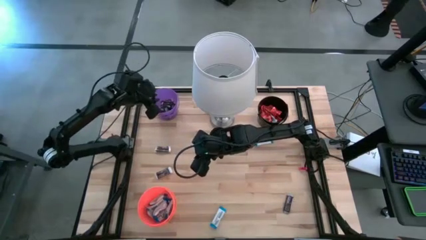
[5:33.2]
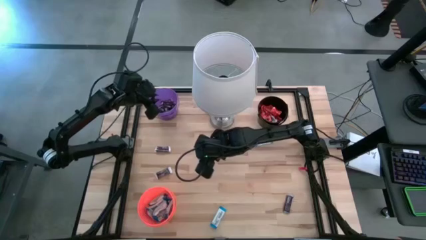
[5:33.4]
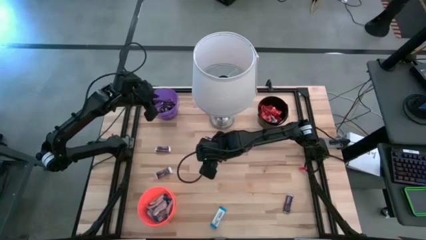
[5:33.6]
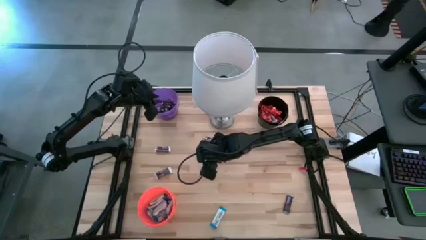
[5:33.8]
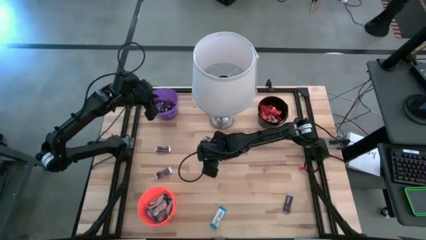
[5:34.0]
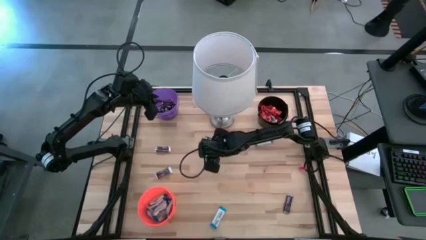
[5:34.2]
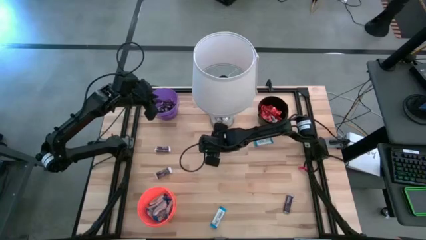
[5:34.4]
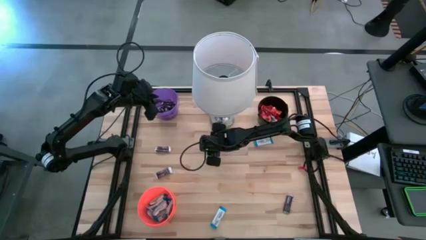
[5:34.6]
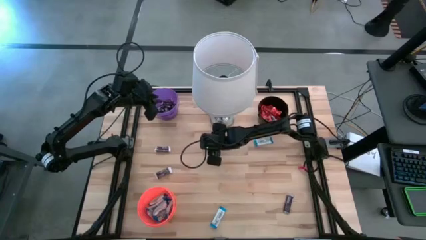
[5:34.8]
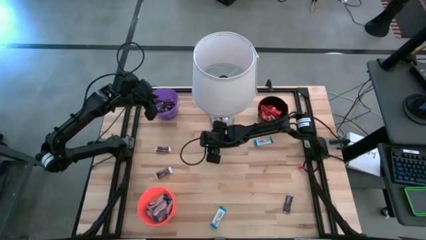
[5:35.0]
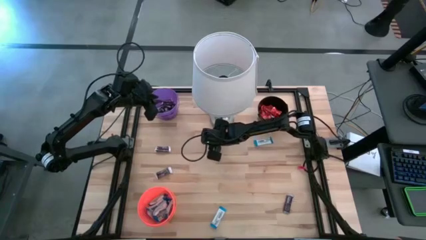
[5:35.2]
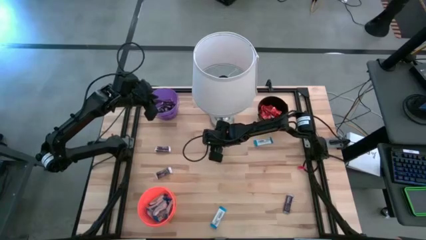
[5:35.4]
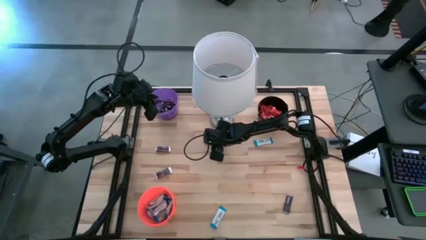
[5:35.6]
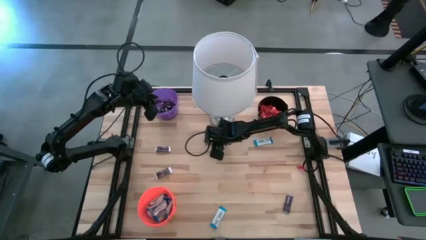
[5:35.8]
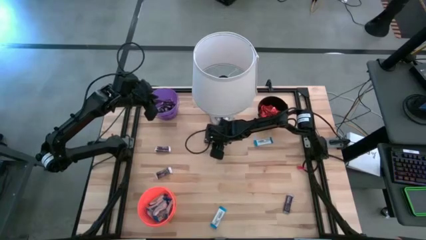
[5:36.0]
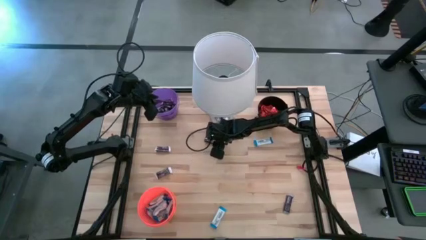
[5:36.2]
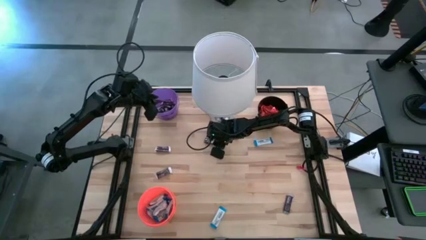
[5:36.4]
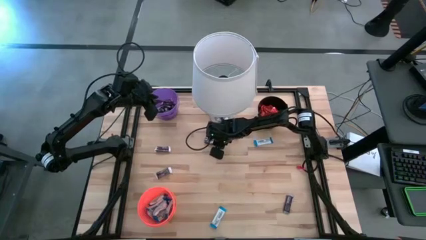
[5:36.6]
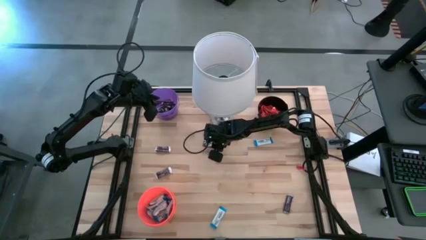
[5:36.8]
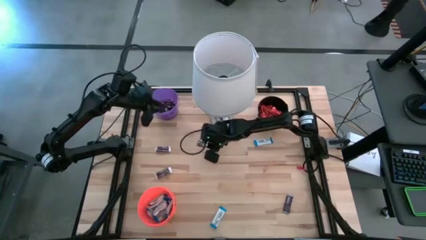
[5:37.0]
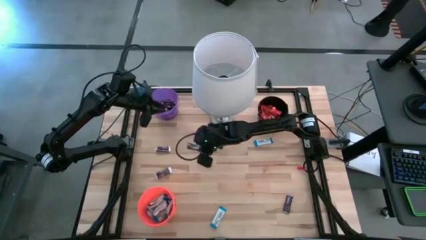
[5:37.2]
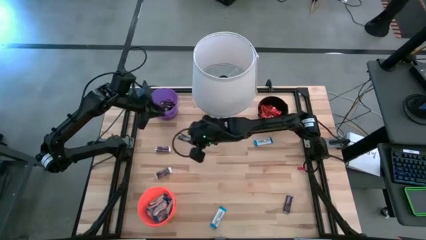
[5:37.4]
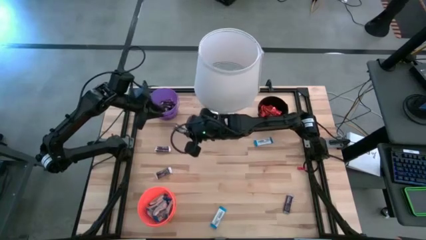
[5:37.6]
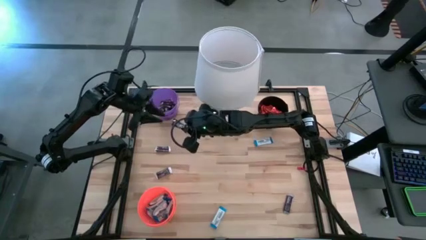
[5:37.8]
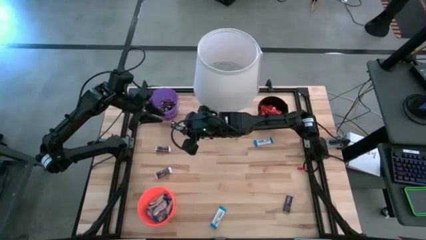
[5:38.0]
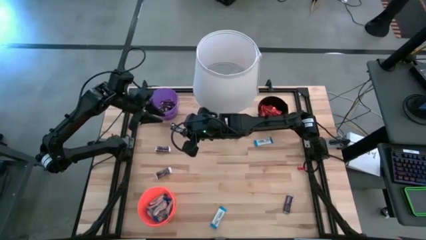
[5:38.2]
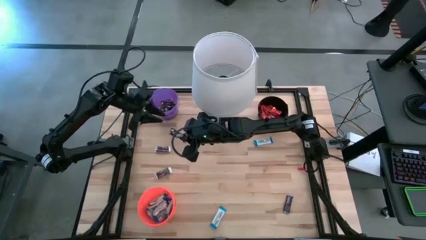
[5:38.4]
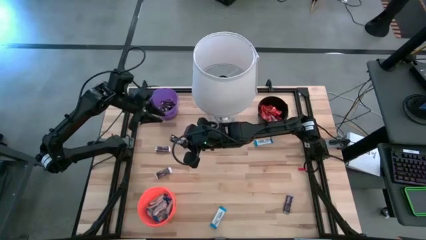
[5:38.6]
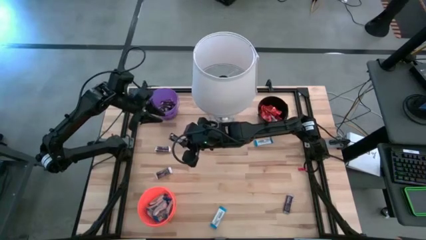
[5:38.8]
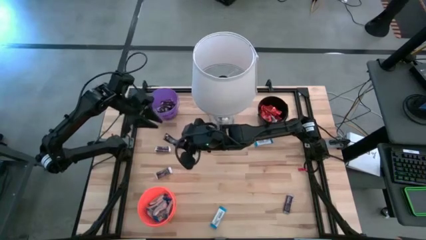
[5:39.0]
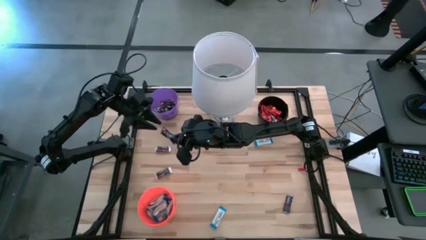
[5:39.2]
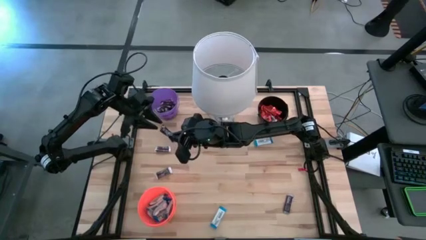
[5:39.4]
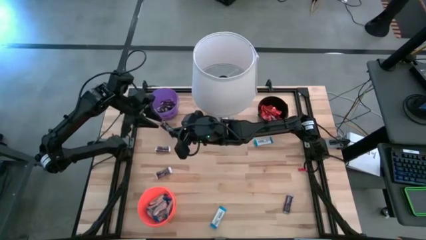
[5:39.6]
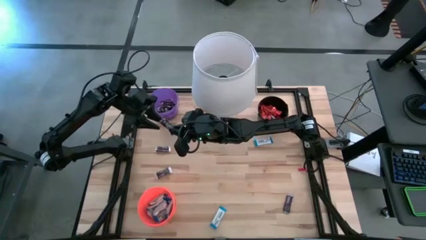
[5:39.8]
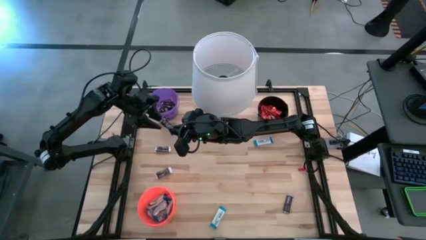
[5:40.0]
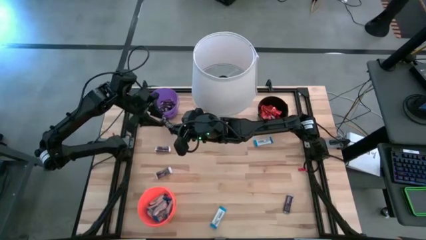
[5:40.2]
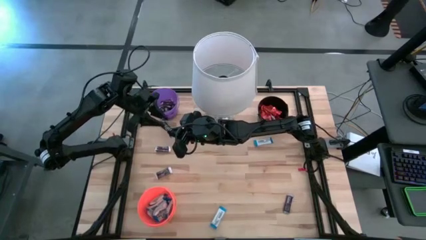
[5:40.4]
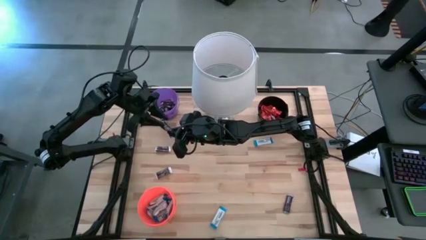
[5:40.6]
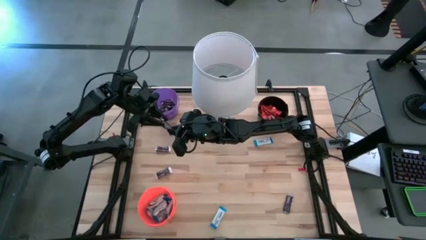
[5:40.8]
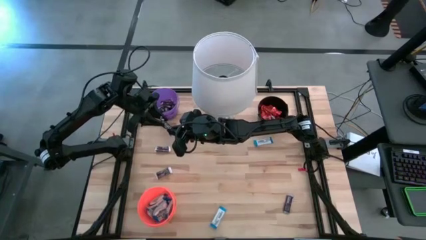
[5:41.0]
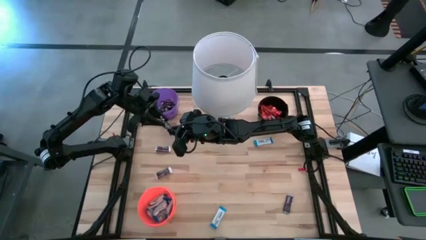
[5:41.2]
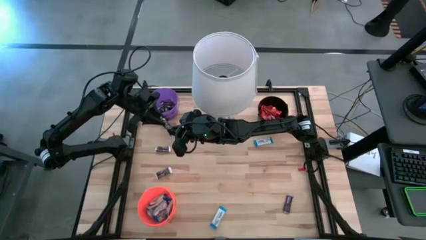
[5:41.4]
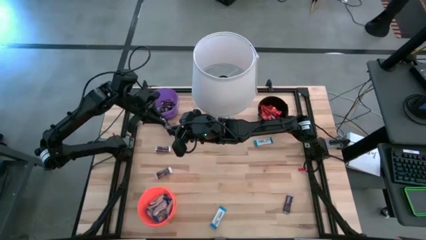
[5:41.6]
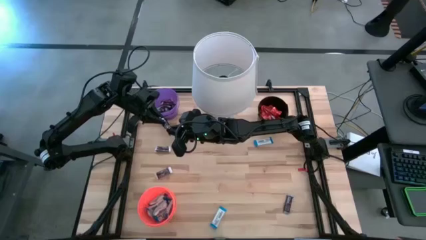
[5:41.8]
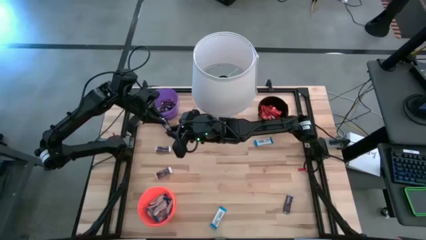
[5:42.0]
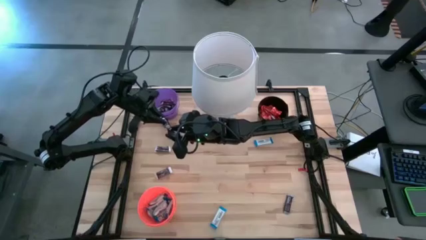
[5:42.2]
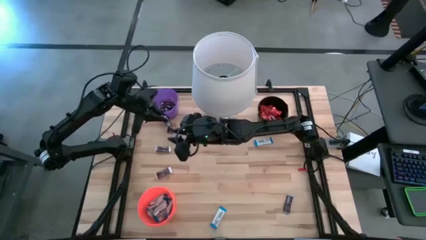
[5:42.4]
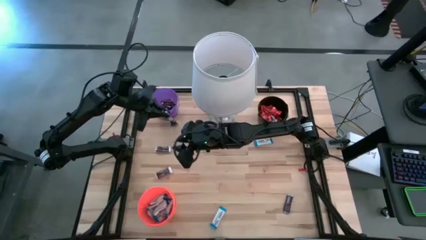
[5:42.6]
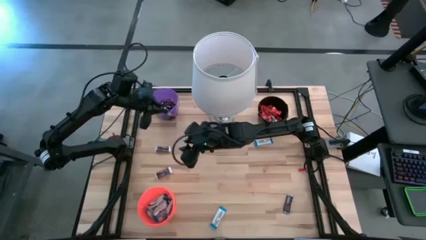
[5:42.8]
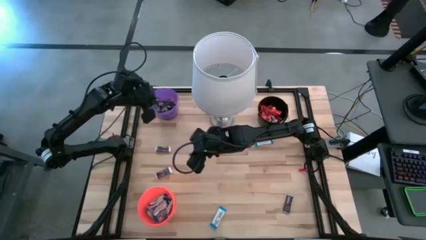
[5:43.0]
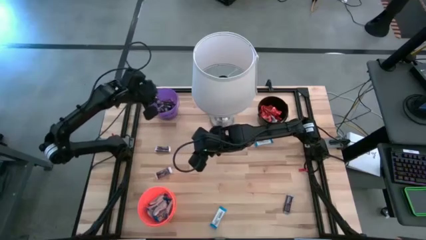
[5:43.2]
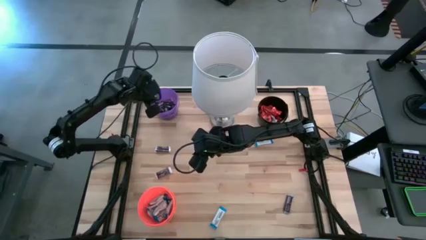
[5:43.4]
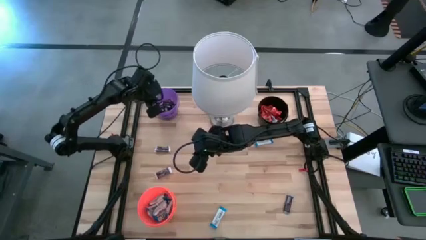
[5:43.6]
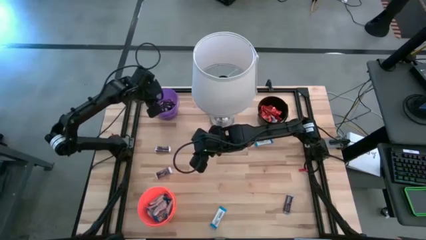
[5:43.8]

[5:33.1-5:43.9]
Task: Organize candy in baskets
Put the brown chocolate bar into the purple bucket

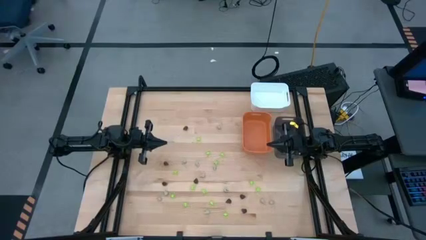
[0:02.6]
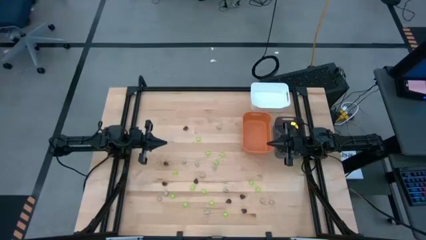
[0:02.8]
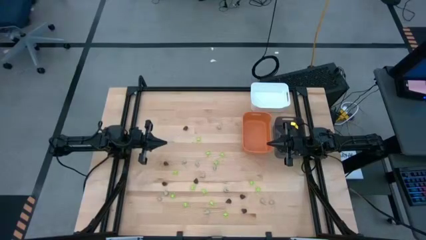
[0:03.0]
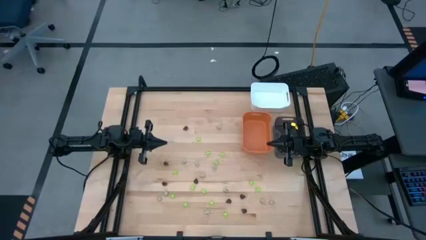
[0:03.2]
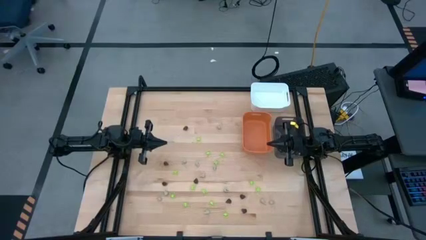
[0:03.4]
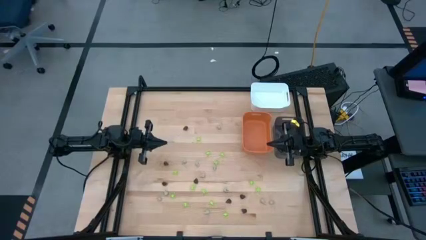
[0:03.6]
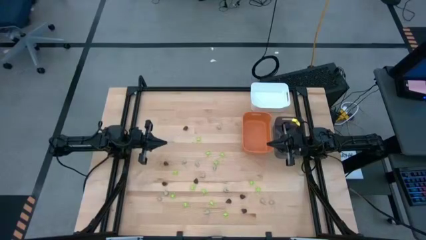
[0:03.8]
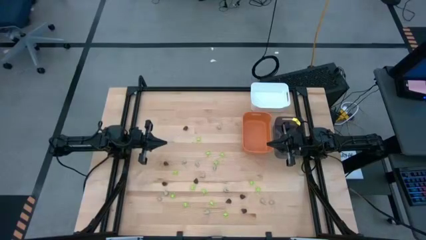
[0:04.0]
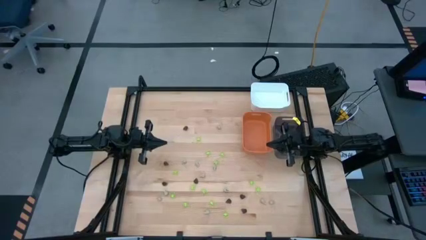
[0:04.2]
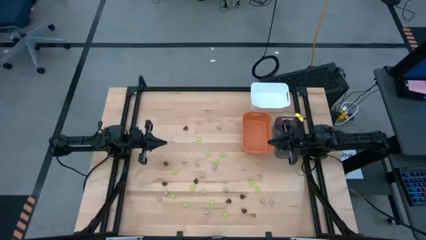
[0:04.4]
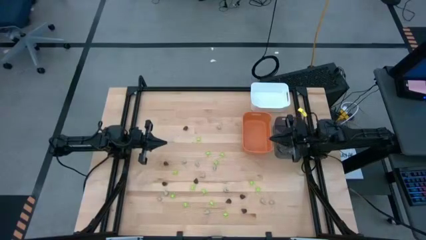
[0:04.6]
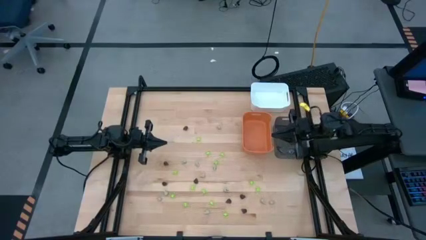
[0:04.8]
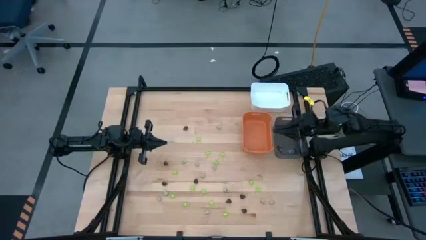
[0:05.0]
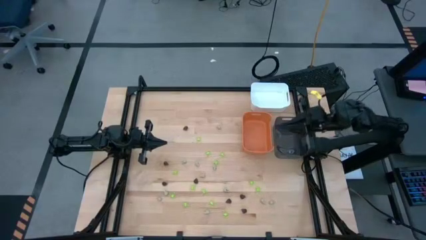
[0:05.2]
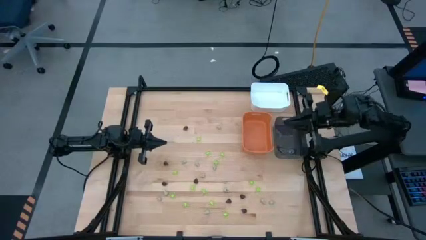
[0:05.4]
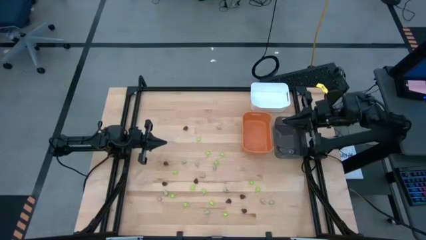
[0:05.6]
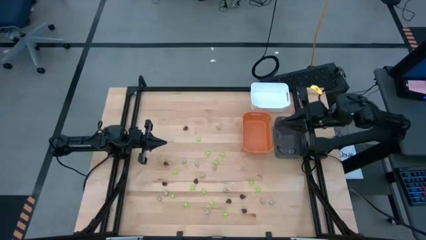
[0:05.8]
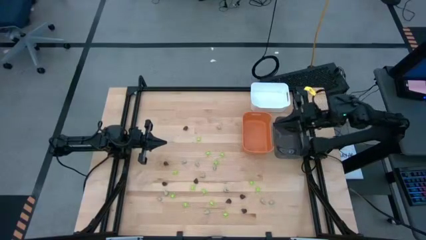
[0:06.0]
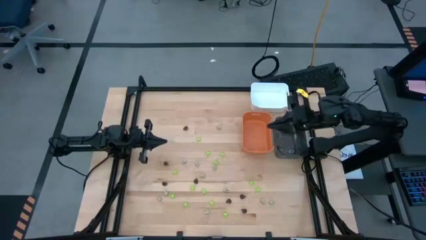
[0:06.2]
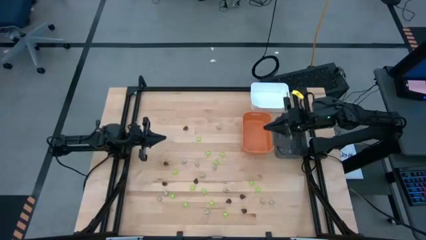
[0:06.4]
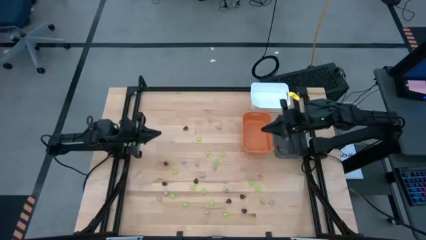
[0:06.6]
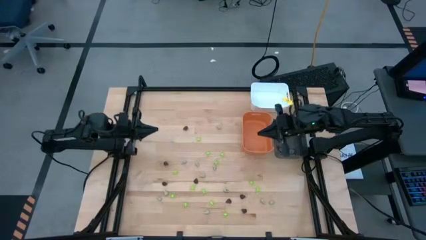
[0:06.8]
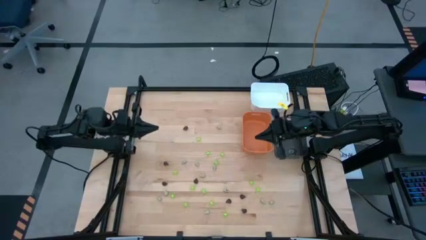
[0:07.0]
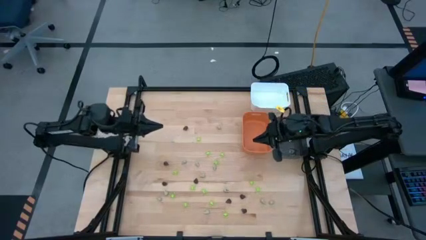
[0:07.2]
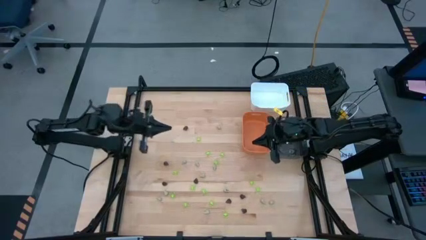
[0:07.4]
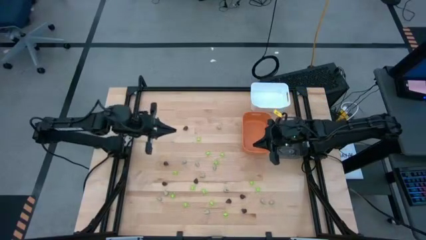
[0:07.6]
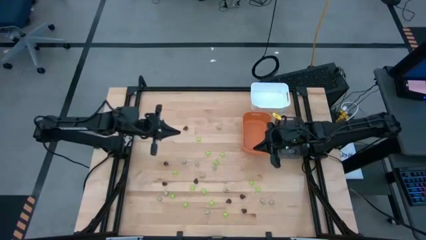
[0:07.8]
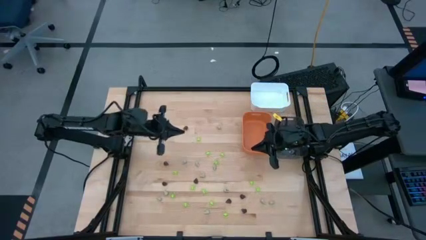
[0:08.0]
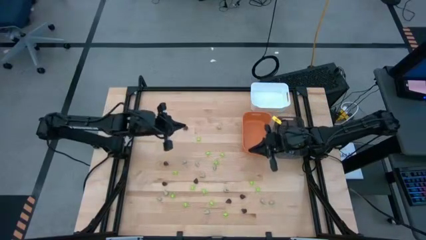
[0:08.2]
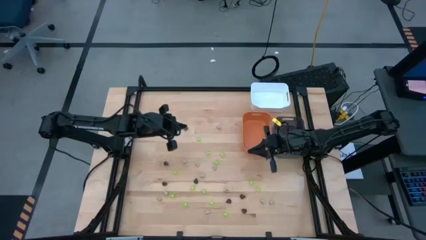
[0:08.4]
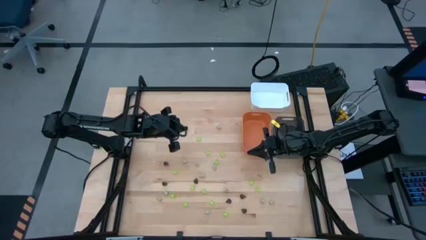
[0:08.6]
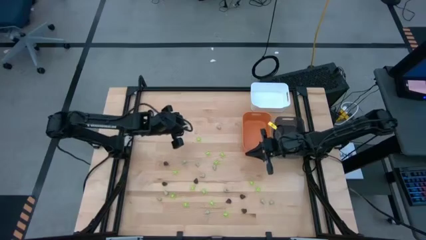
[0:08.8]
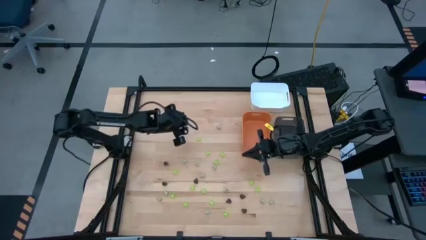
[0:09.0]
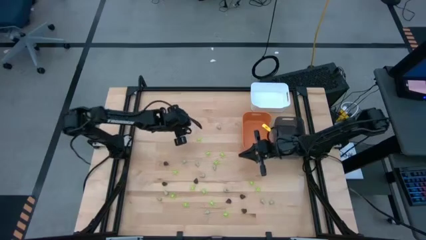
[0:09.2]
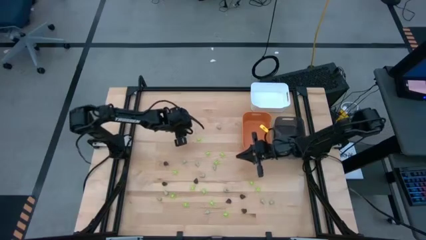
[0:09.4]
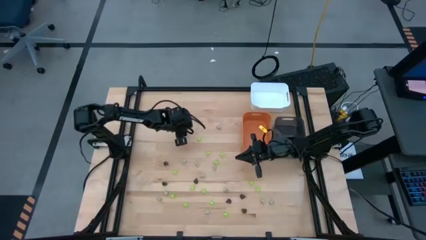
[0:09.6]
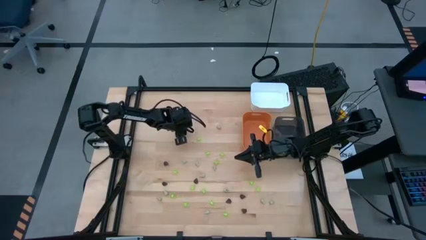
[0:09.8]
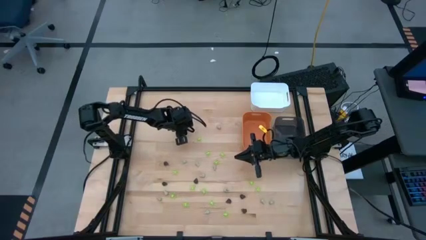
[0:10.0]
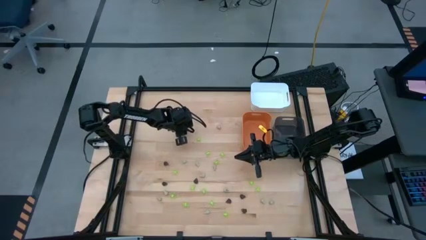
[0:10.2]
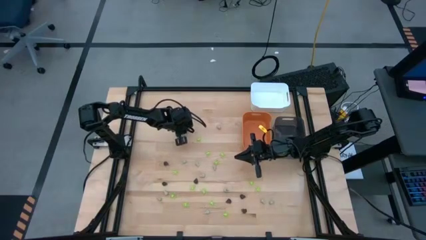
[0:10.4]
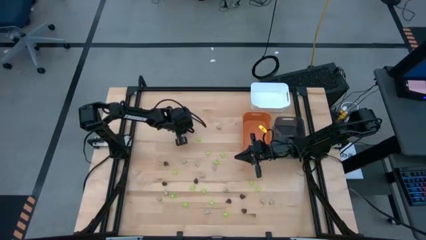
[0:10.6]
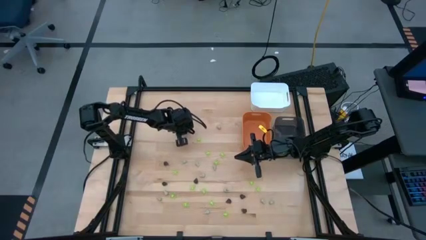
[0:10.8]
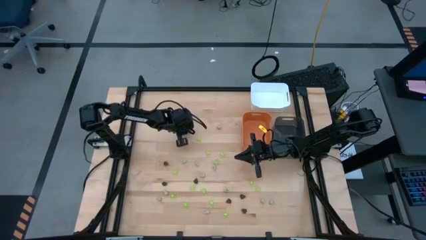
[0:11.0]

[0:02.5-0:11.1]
Task: Sort Halloween decoration
Put the black skull toy into the orange bin
